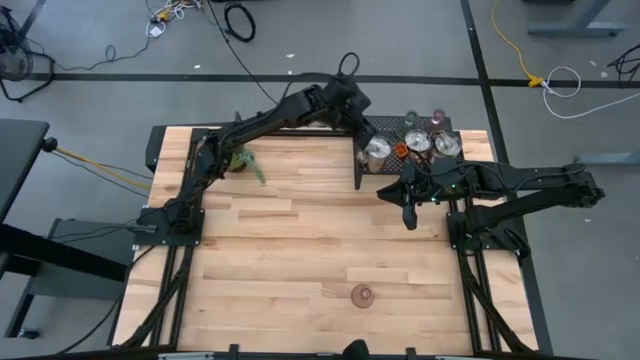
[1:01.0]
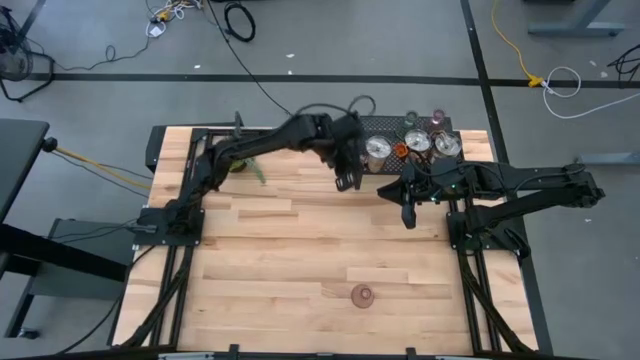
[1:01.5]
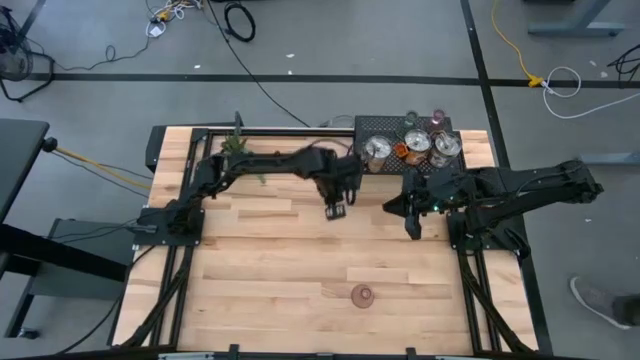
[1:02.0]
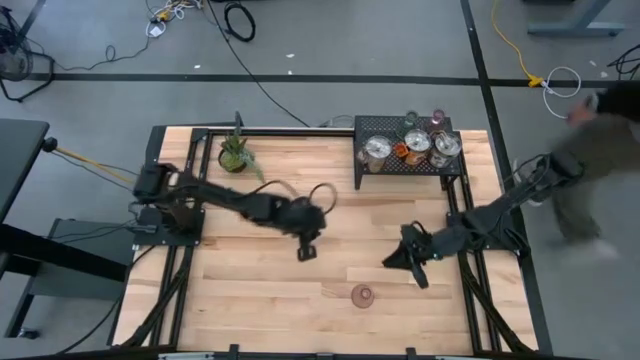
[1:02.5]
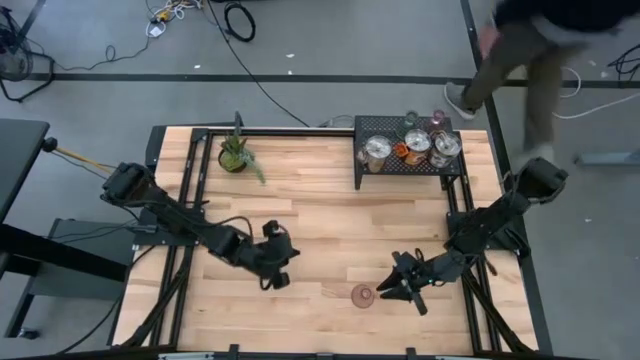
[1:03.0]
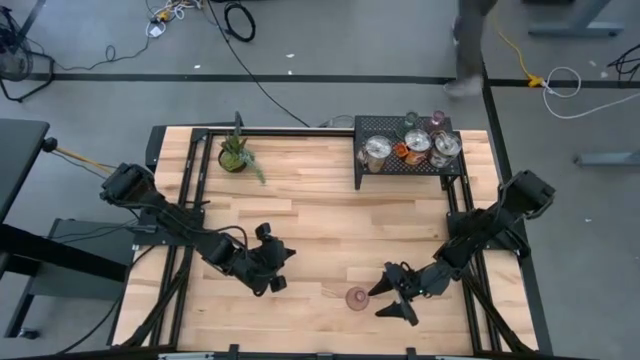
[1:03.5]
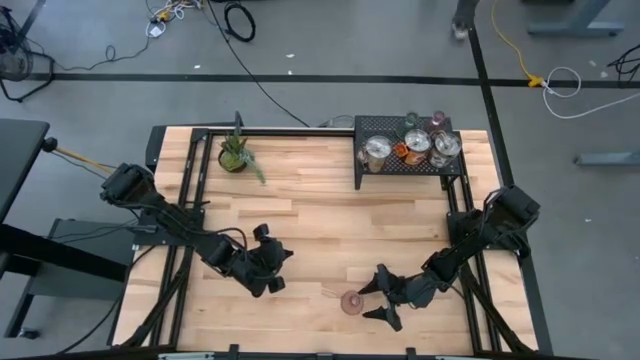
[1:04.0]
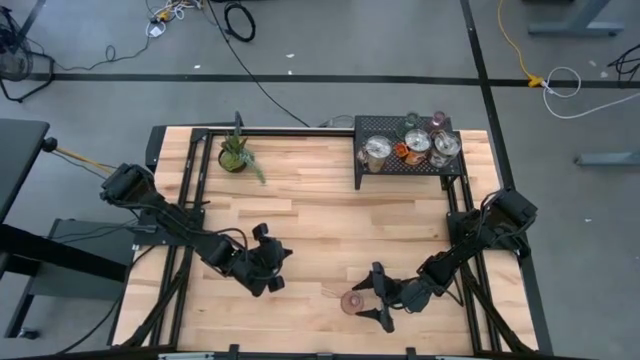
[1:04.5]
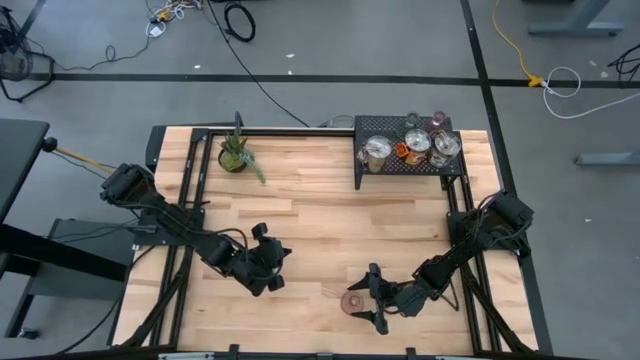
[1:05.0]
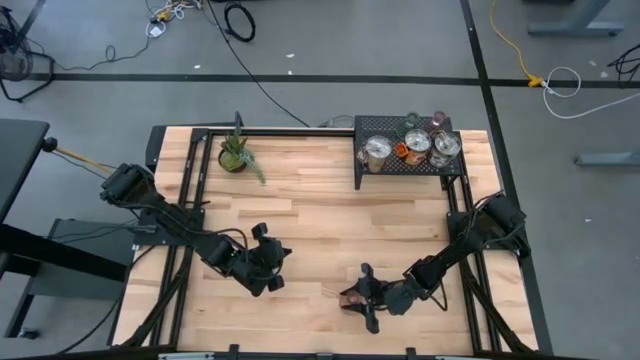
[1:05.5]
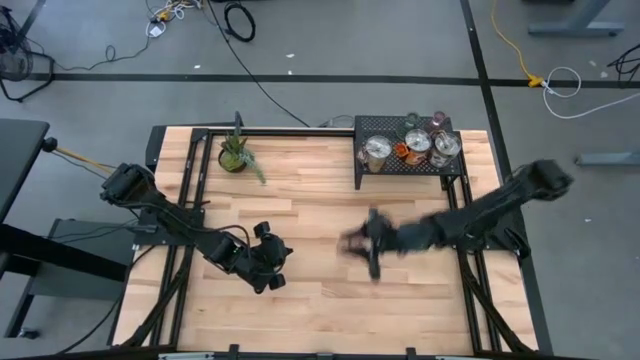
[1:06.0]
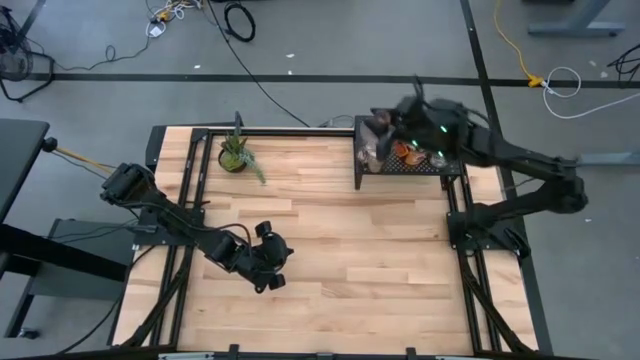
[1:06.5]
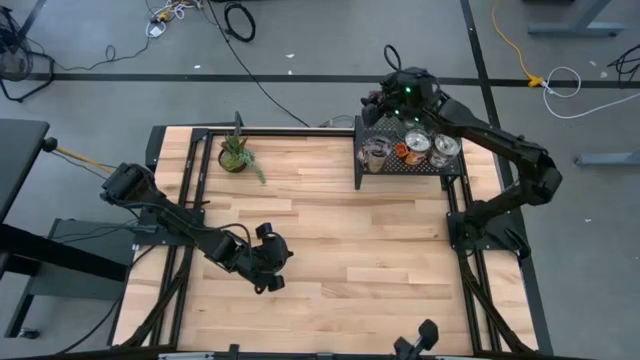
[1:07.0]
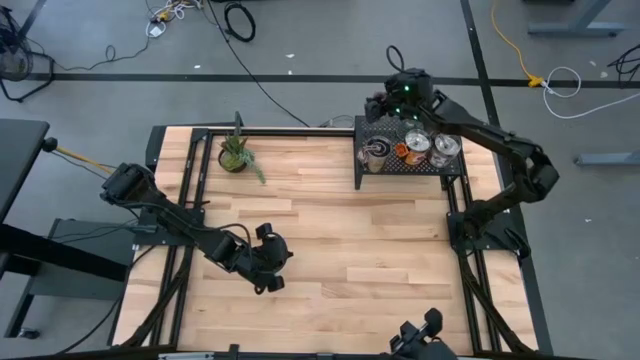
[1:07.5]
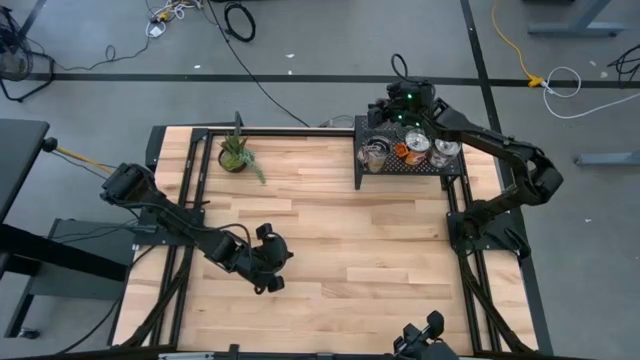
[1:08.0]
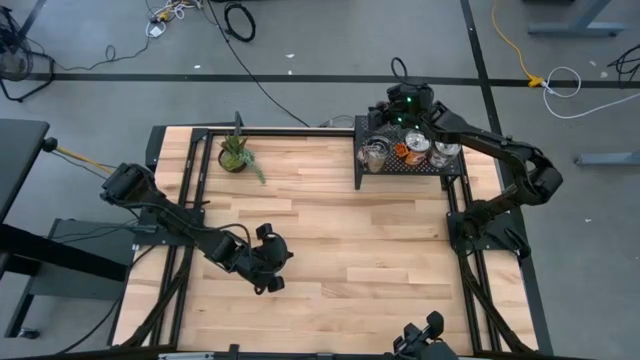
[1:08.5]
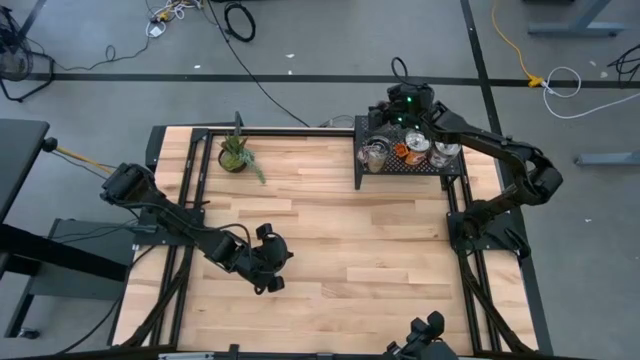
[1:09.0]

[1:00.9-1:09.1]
Task: Pick & Place candle stick holders
Put the pink glass candle holder on the shelf

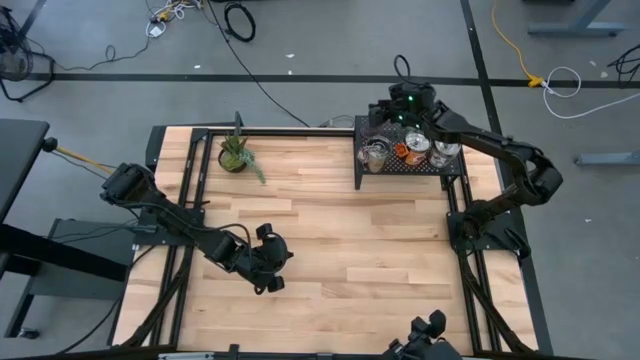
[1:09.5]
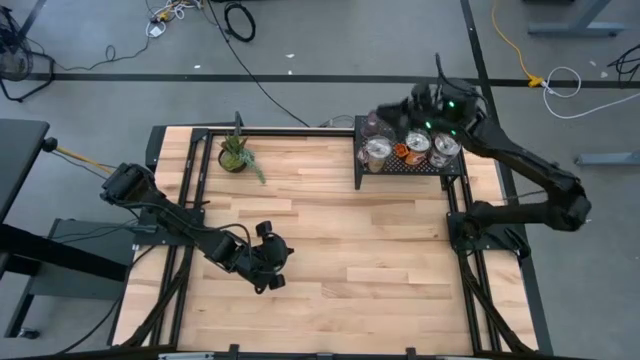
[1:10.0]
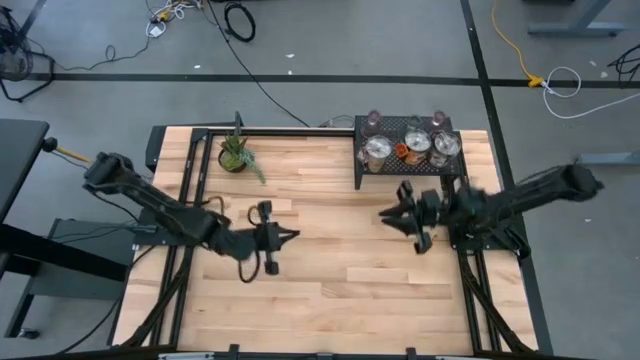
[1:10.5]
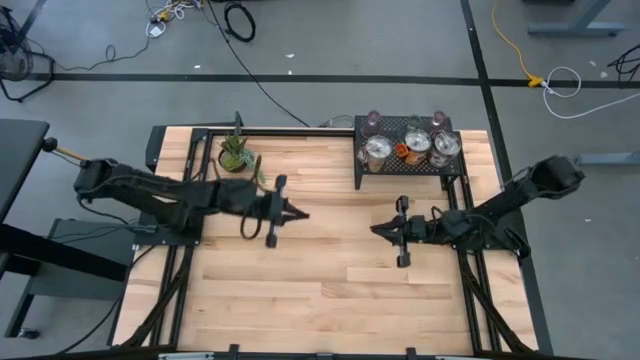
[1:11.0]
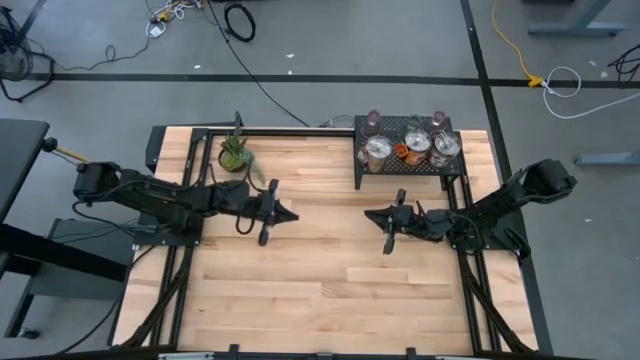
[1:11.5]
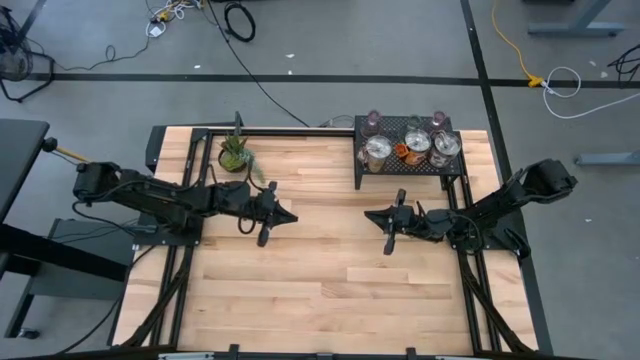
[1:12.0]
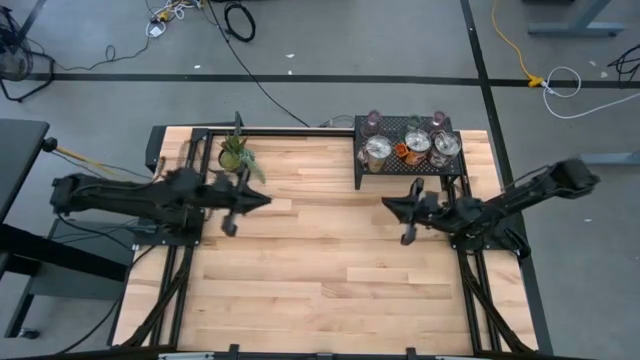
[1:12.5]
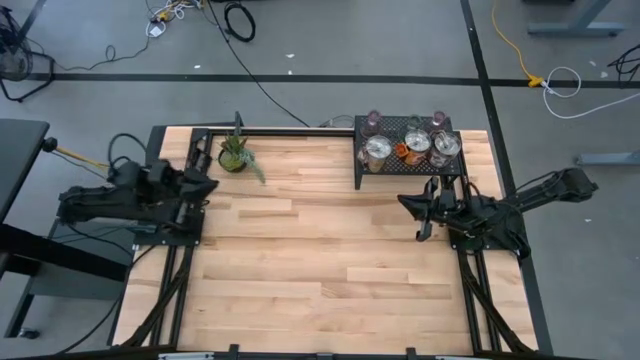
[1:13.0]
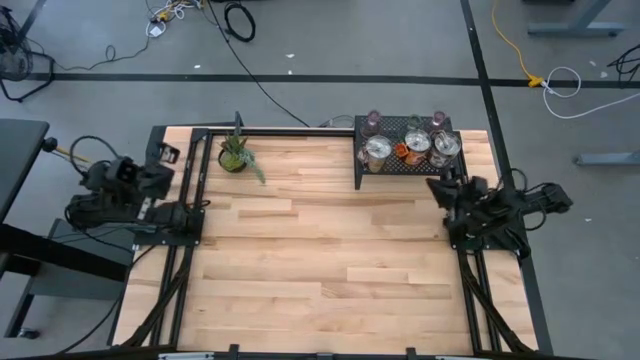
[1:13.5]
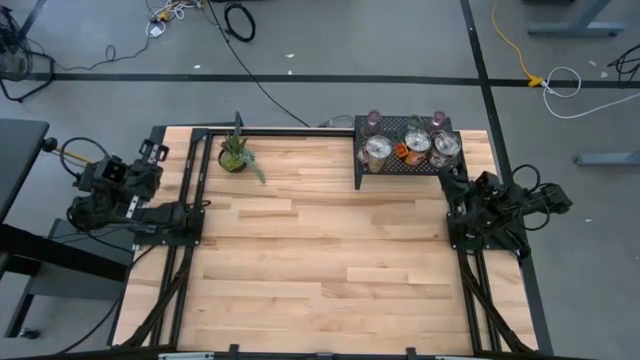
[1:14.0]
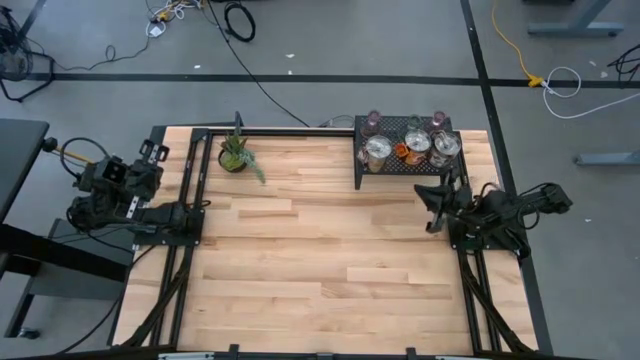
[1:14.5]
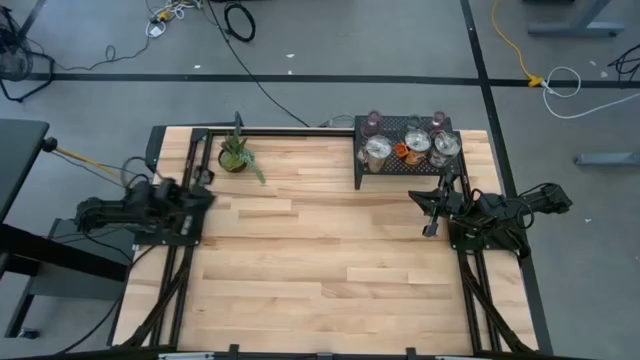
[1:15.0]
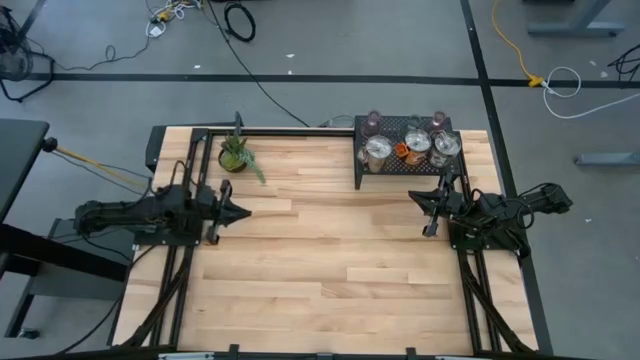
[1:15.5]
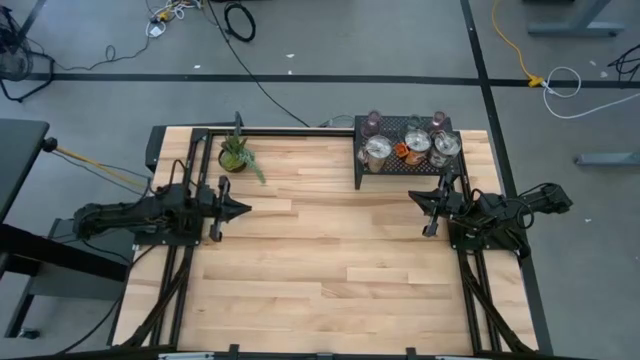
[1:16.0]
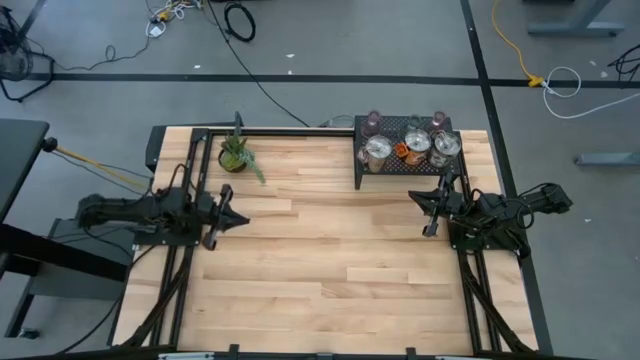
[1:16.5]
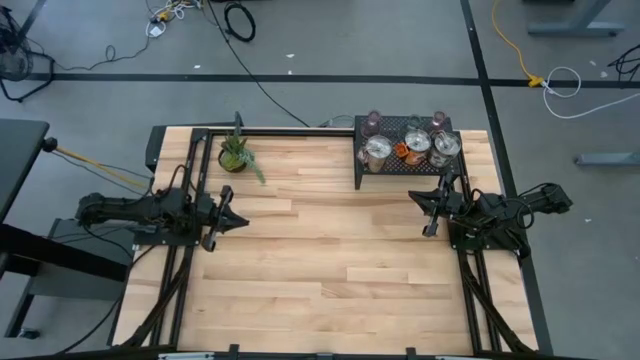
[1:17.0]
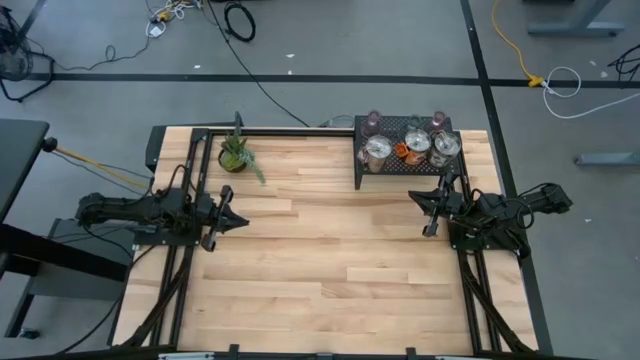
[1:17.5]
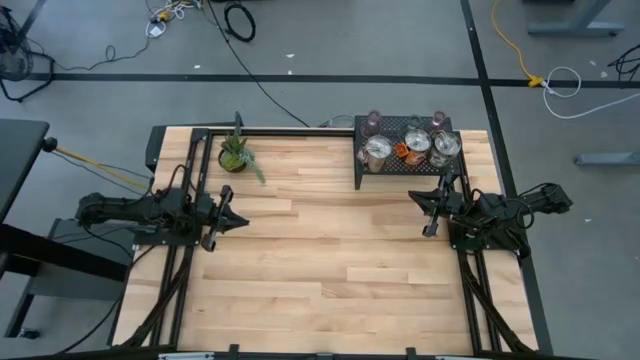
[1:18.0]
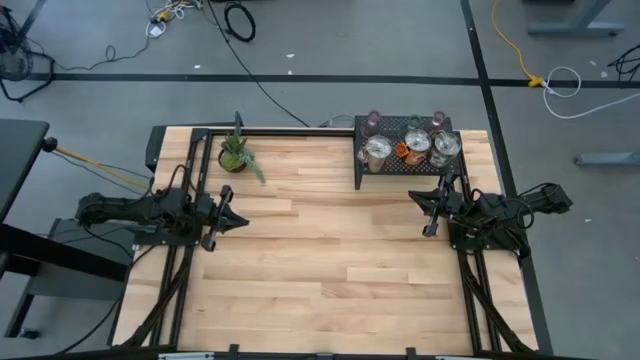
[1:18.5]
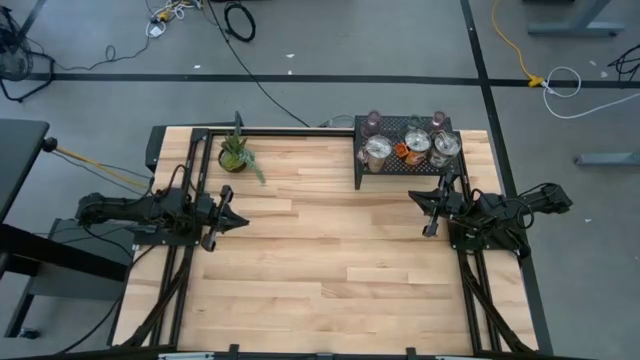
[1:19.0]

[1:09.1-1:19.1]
Return to Home Position

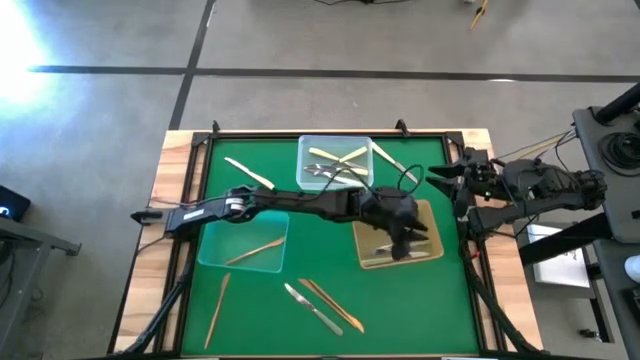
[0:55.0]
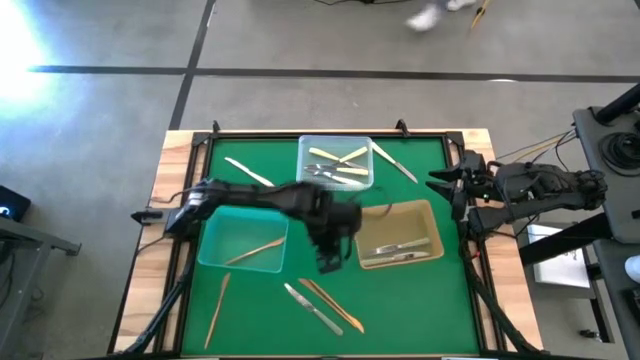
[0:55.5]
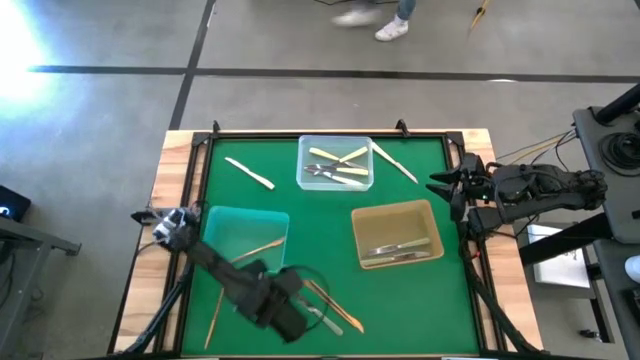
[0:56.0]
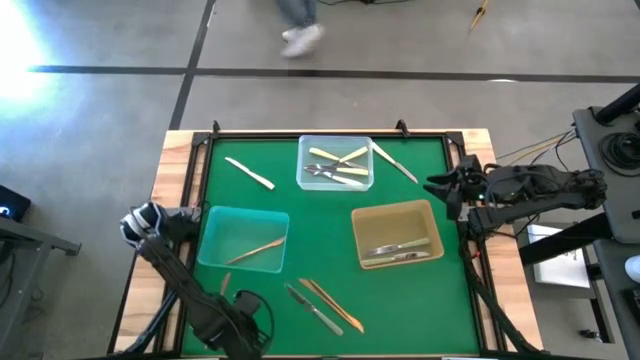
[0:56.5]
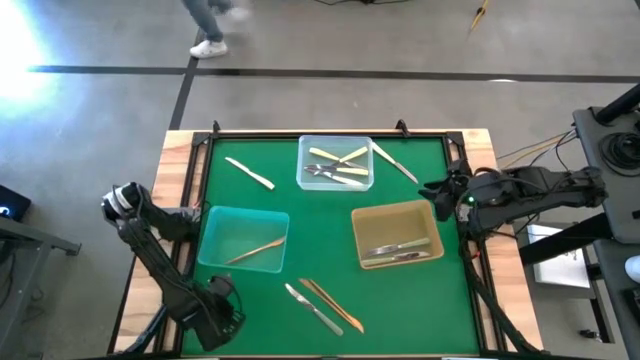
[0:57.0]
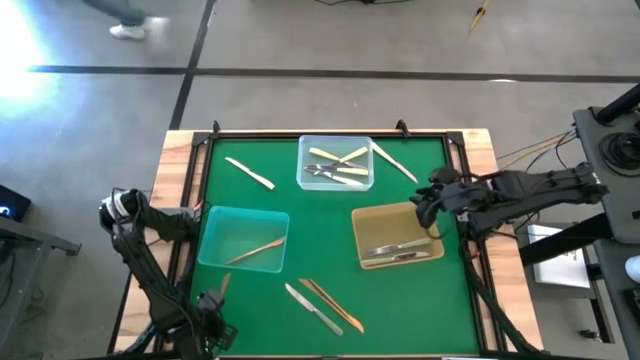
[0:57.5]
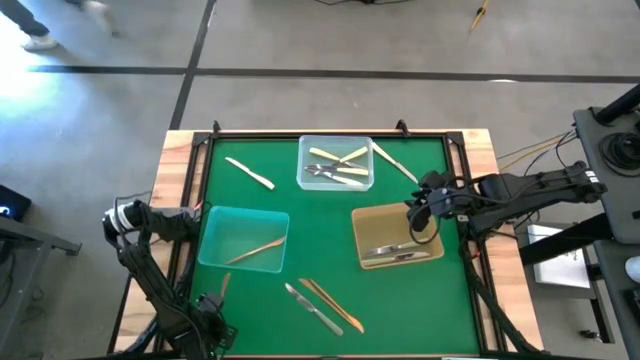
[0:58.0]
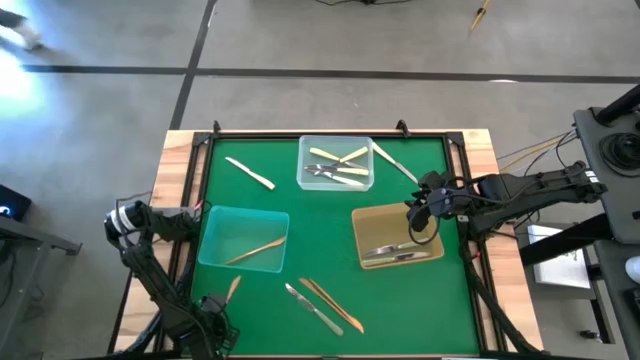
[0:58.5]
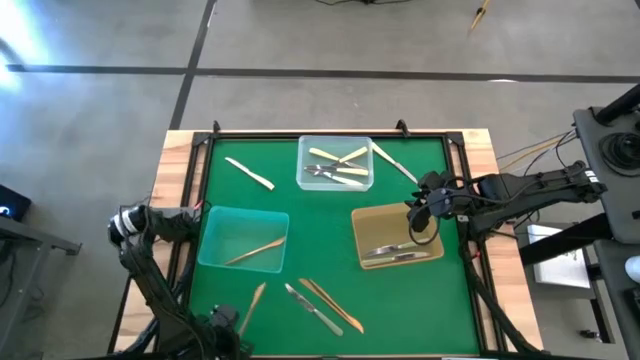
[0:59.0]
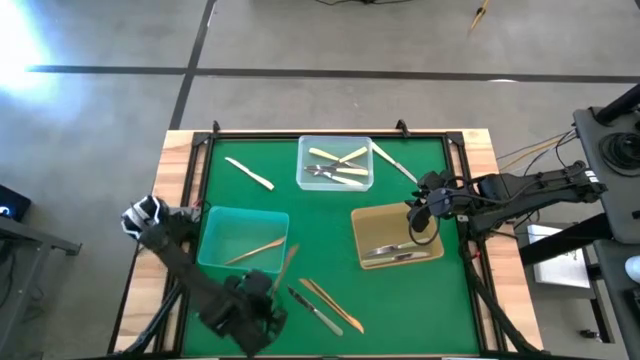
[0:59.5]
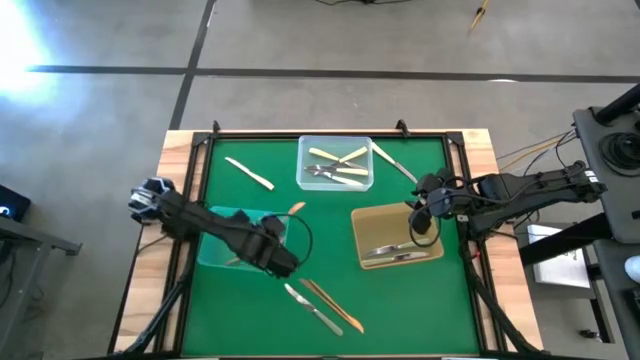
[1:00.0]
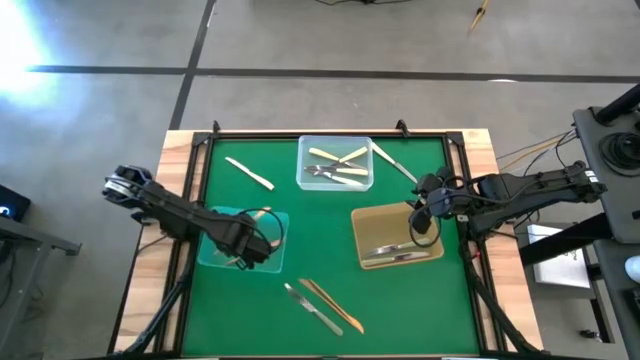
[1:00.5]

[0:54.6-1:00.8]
Task: Sort silverware by color (type)
Put the gold knife into the blue bin
